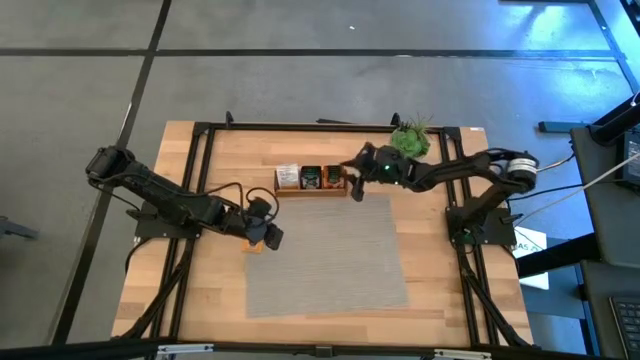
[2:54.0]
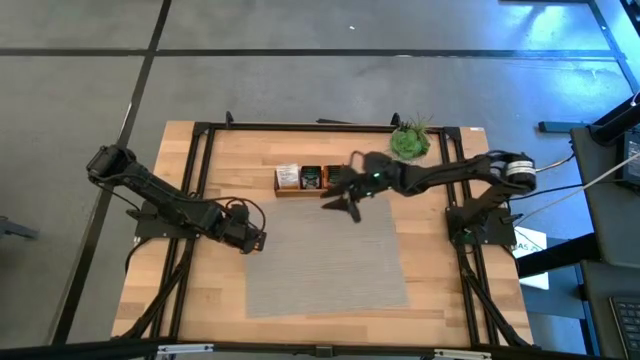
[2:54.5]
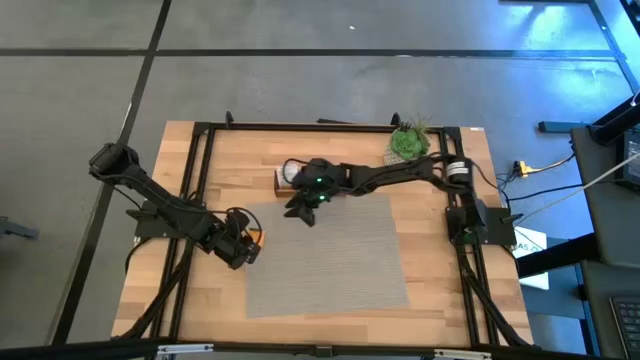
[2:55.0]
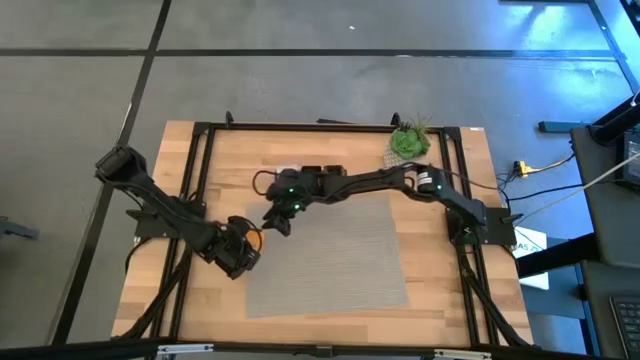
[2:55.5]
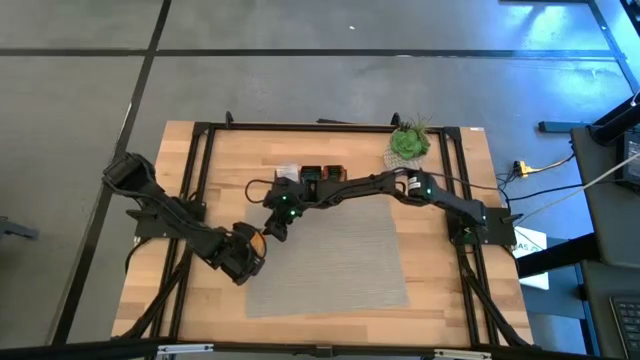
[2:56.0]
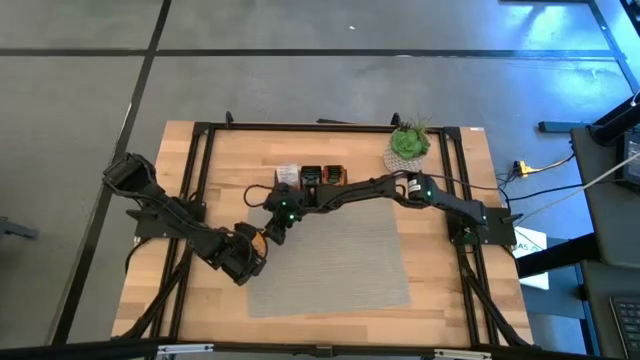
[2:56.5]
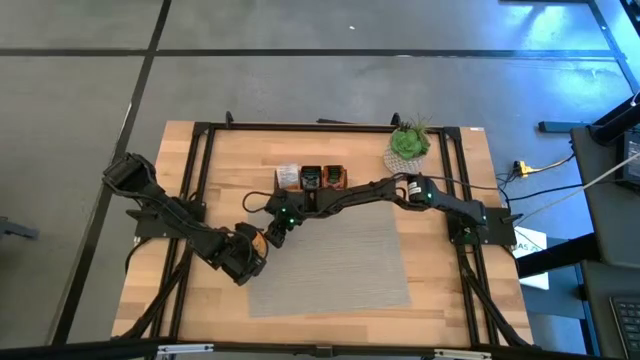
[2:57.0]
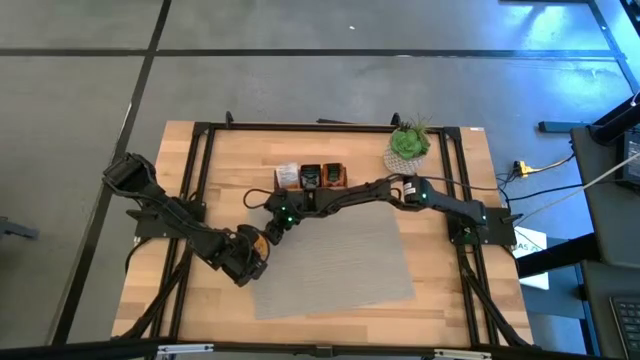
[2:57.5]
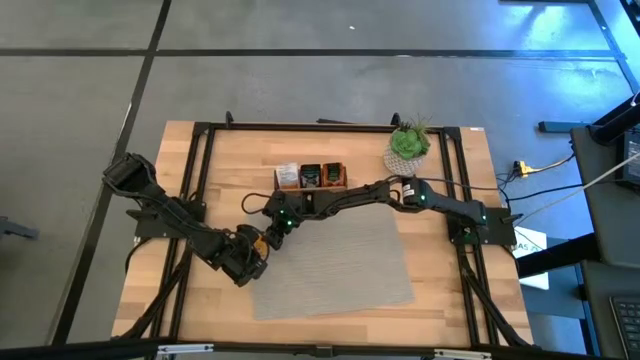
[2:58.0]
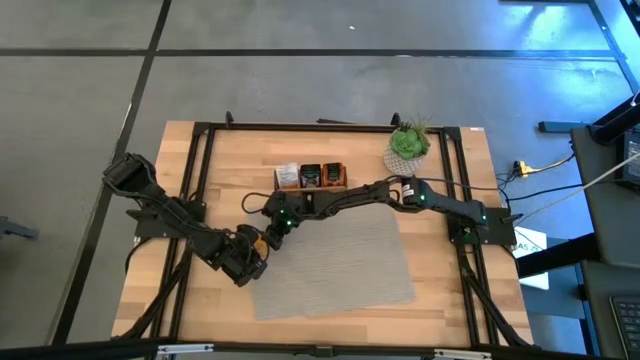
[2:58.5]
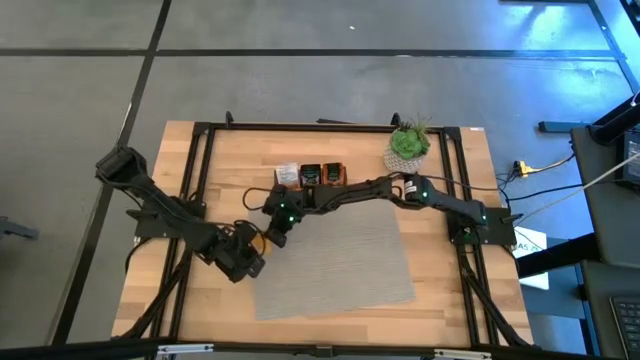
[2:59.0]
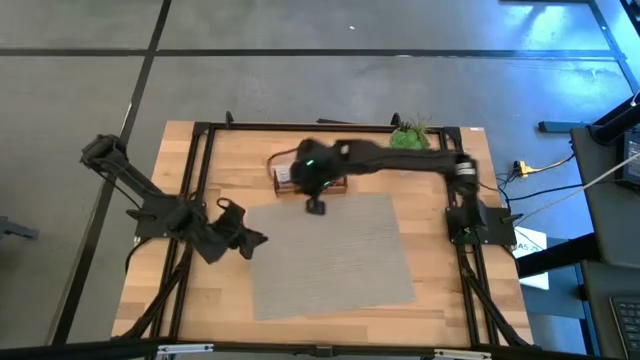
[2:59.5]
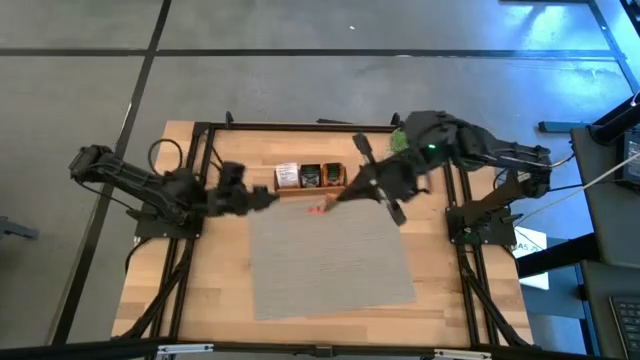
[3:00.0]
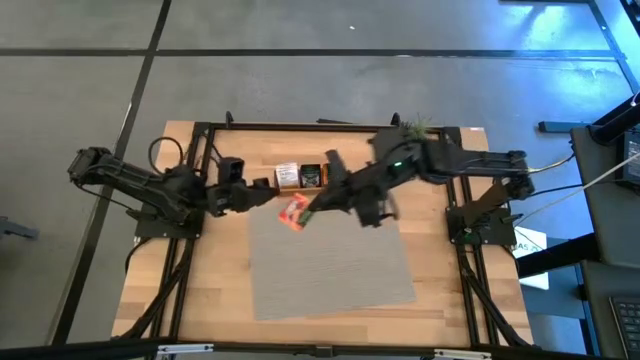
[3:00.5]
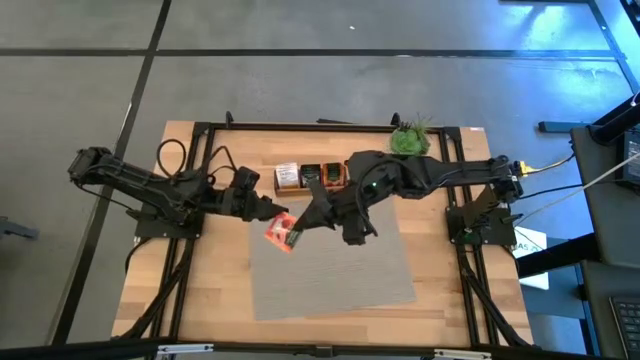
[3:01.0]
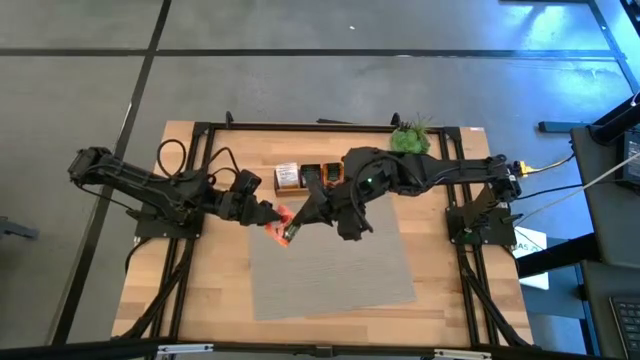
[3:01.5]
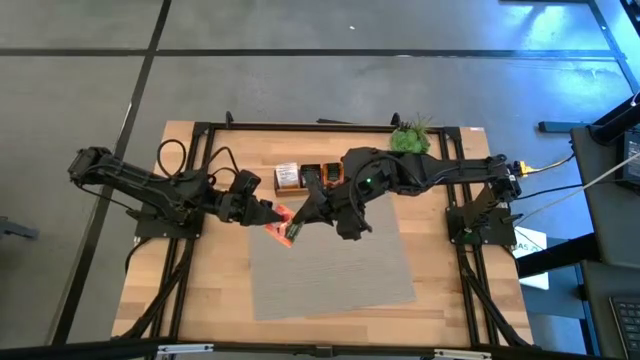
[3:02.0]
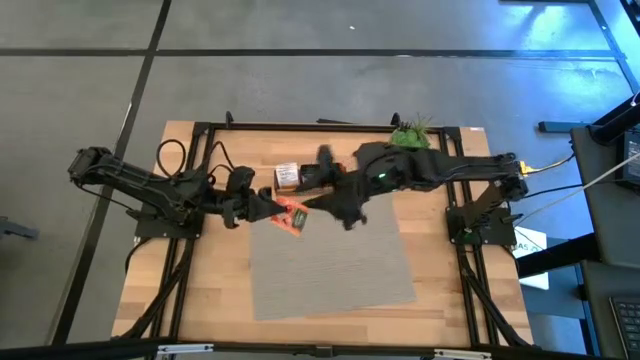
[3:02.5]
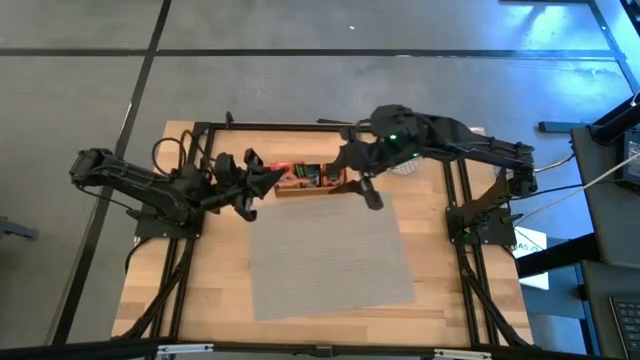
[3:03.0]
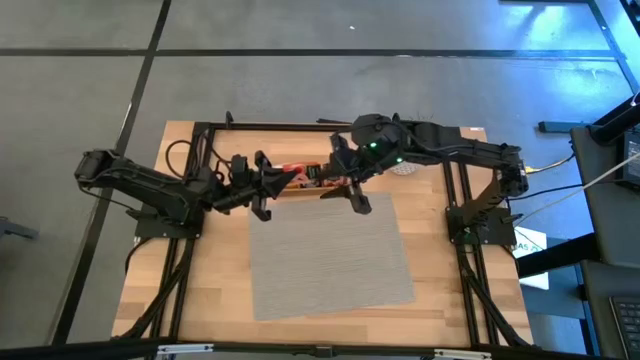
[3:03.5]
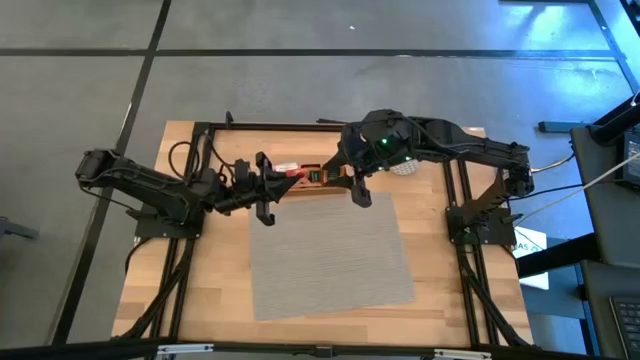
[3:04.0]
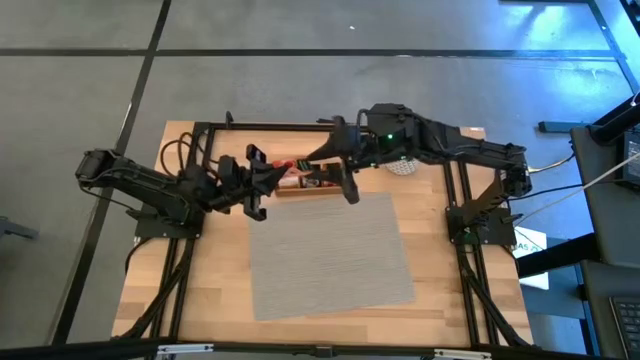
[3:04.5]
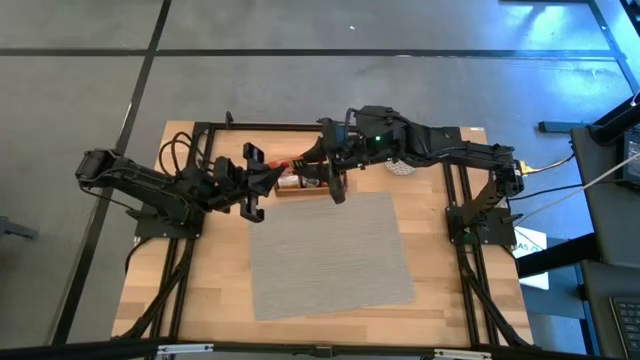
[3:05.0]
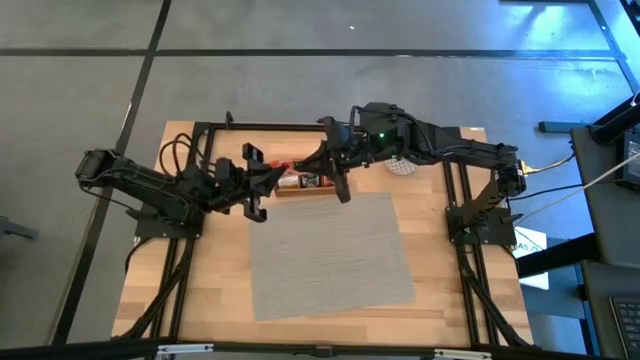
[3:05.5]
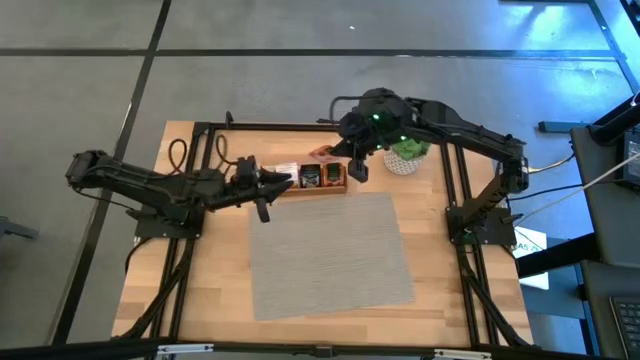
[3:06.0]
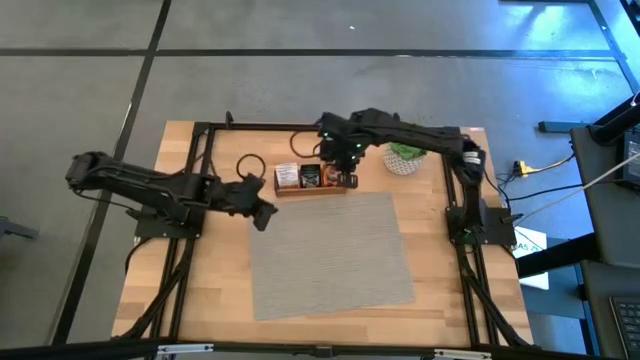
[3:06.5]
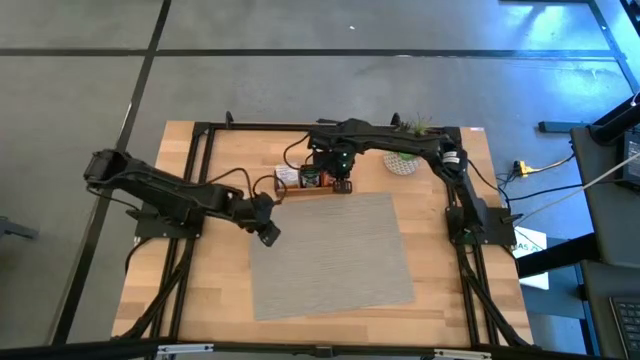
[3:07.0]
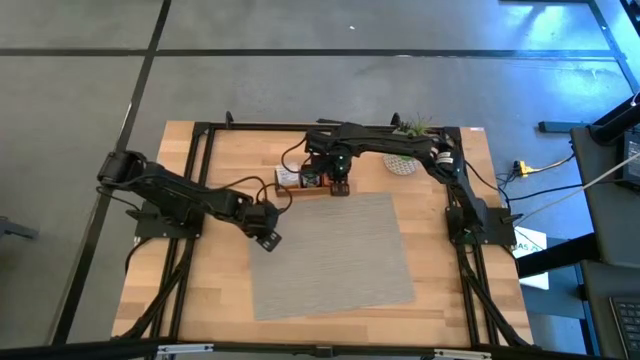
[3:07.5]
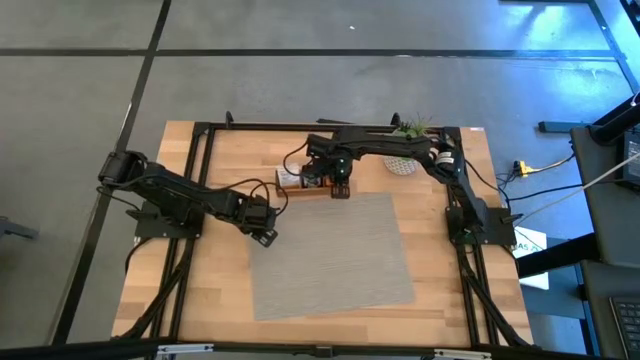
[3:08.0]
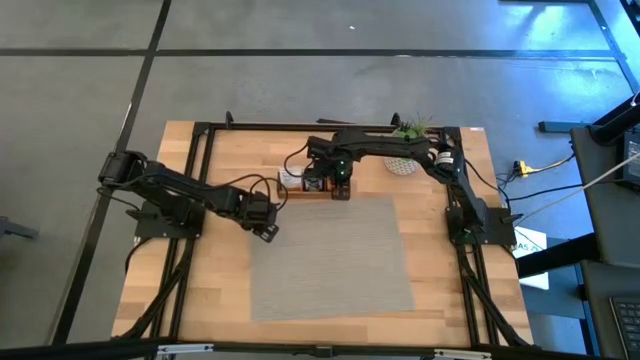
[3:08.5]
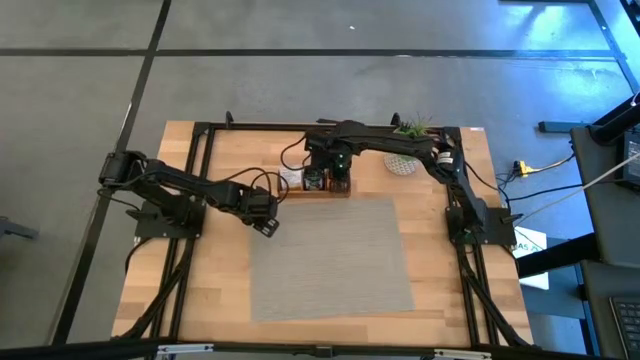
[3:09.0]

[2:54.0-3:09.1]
Task: Pick & Place Tea
Put the orange tea bag into the right section of the wooden organizer

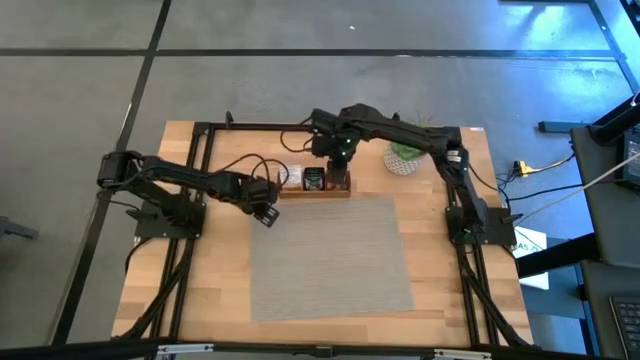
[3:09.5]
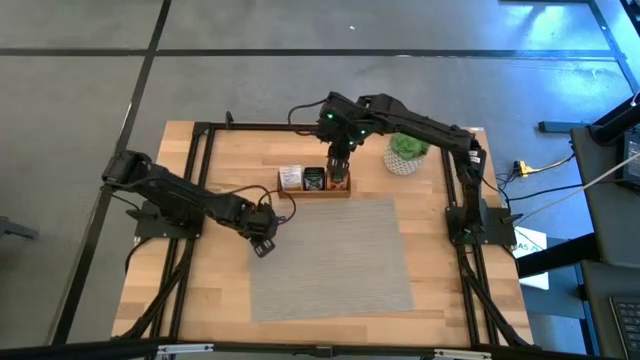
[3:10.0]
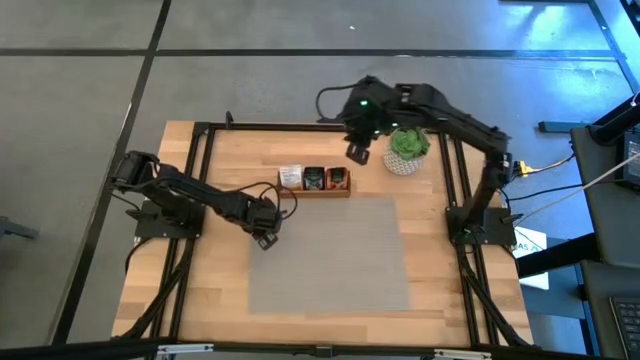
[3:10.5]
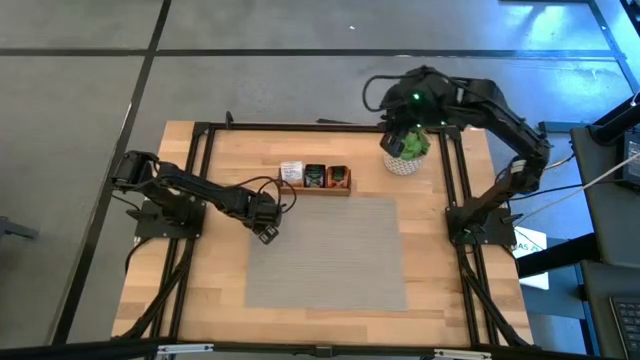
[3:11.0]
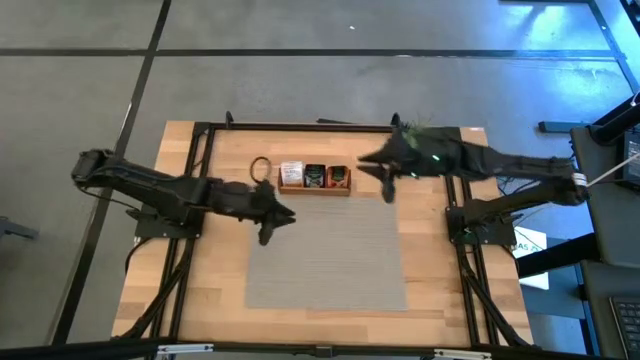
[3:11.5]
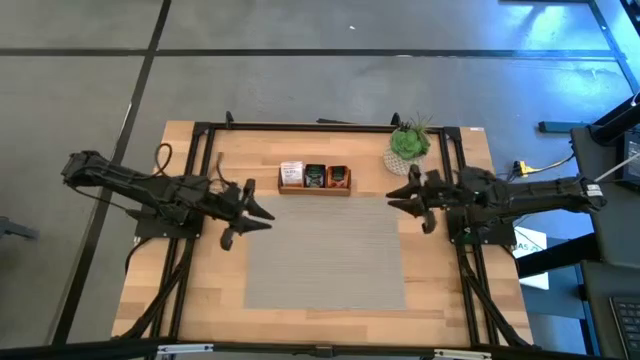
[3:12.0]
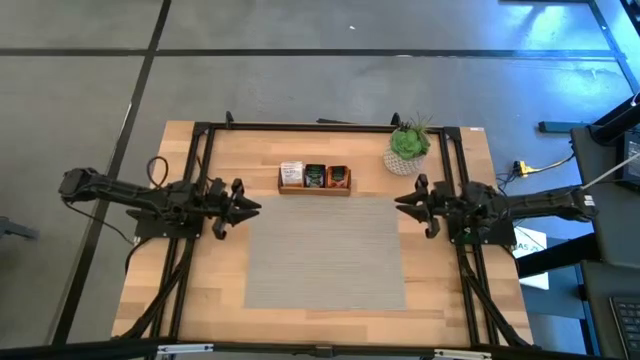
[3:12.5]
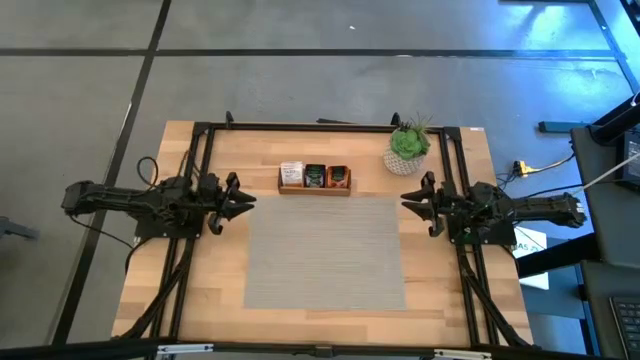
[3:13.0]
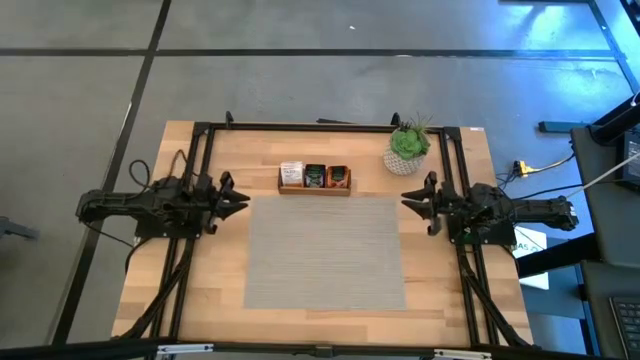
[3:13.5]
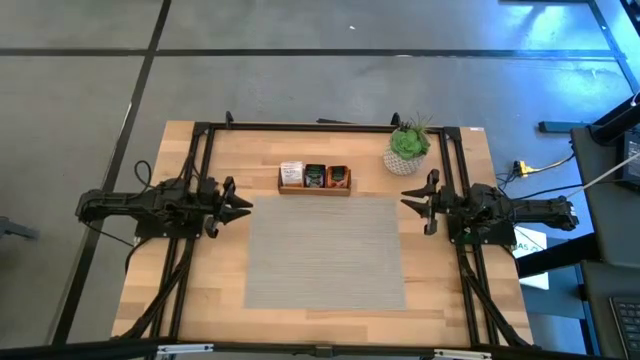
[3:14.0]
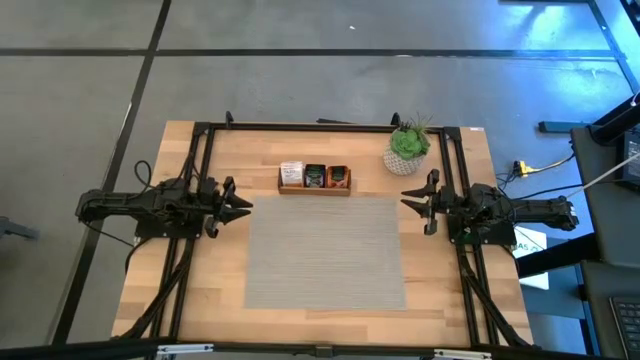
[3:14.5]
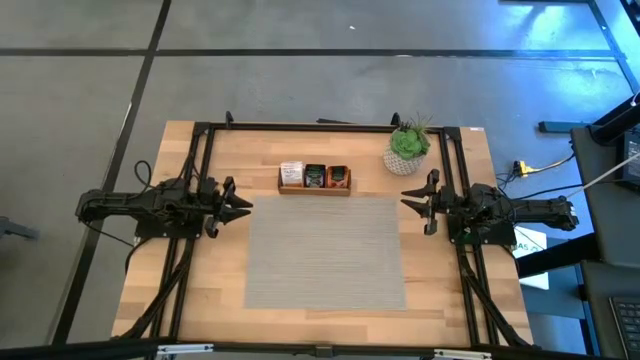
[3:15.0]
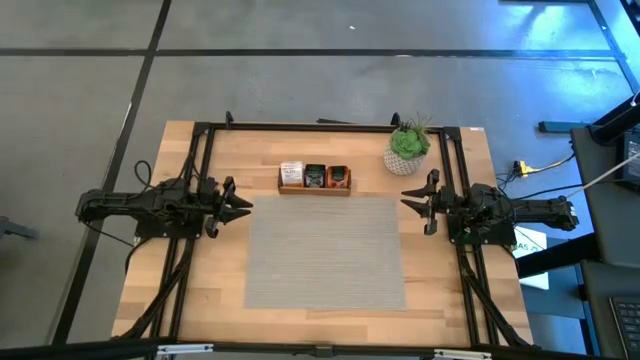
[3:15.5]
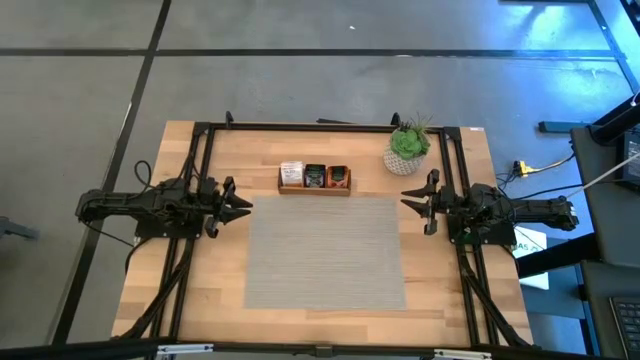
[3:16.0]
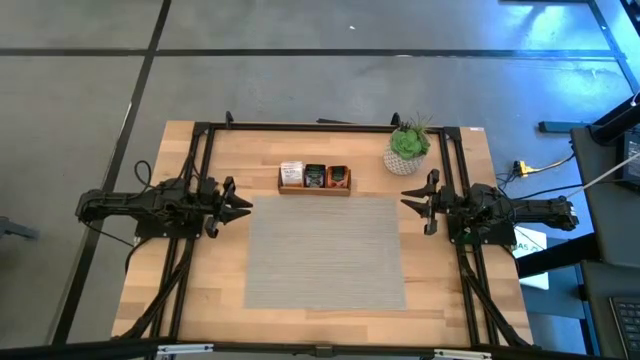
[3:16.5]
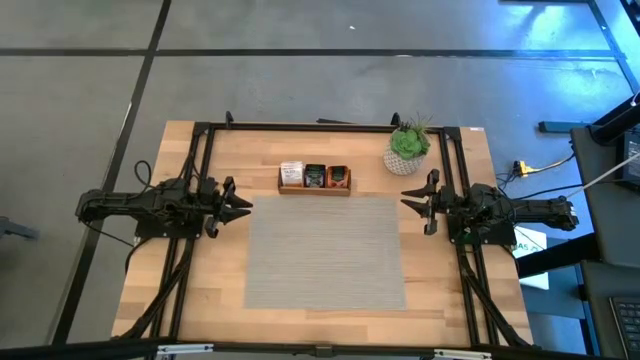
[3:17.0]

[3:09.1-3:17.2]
Return to Home Position
